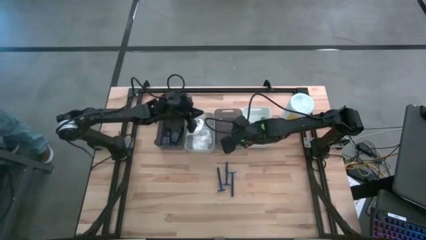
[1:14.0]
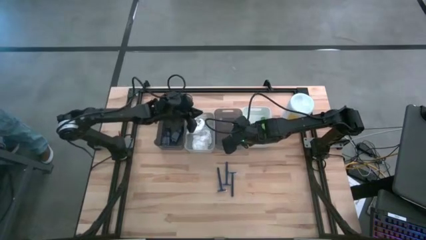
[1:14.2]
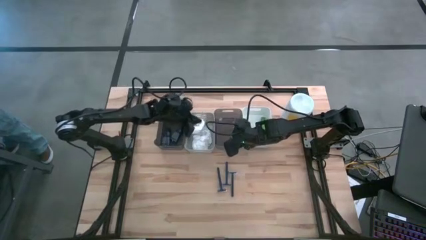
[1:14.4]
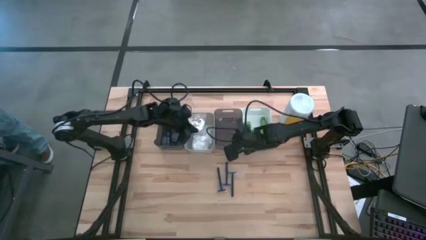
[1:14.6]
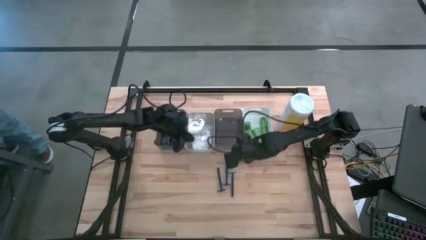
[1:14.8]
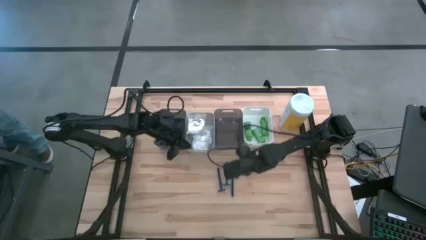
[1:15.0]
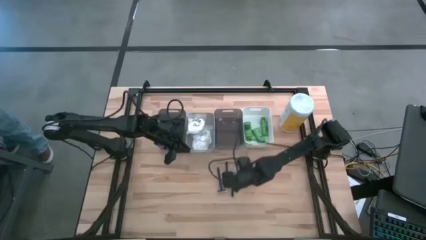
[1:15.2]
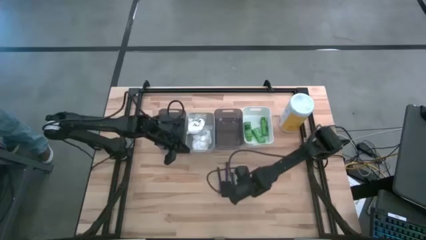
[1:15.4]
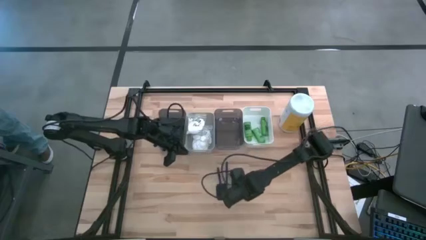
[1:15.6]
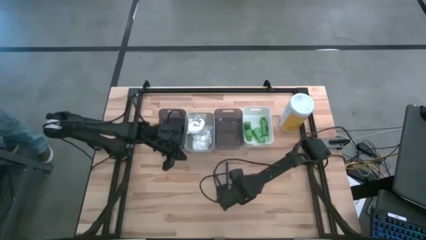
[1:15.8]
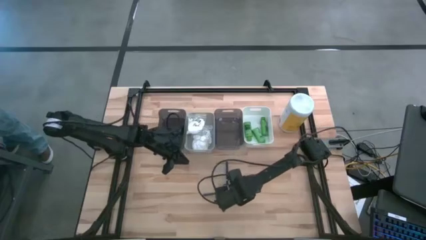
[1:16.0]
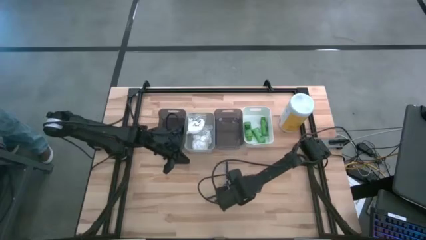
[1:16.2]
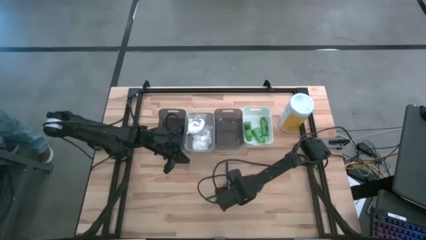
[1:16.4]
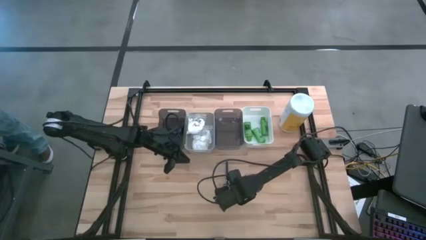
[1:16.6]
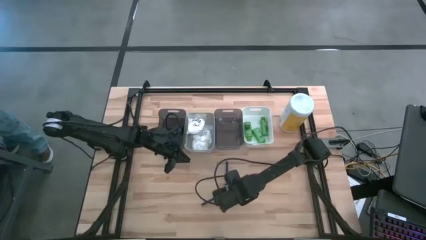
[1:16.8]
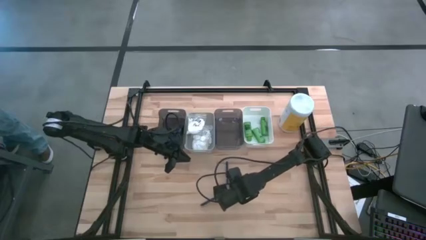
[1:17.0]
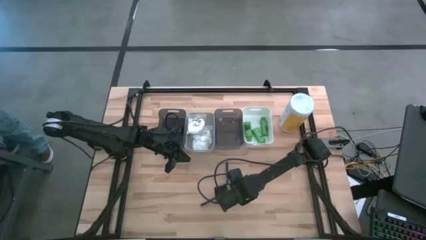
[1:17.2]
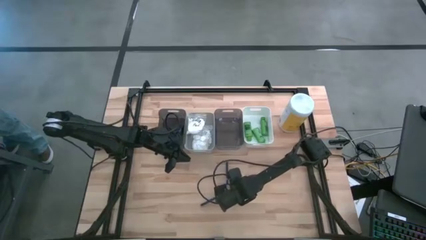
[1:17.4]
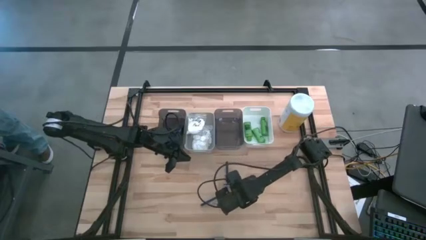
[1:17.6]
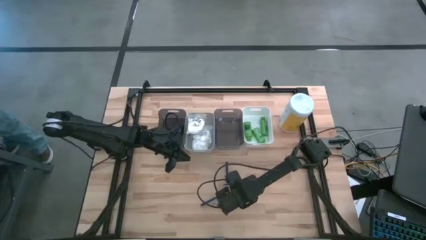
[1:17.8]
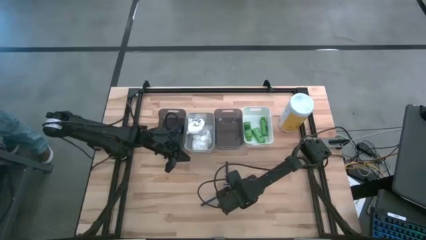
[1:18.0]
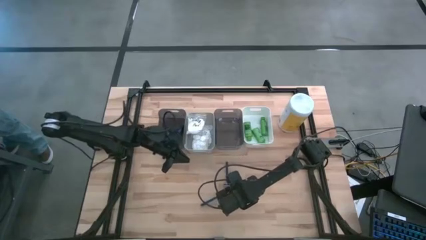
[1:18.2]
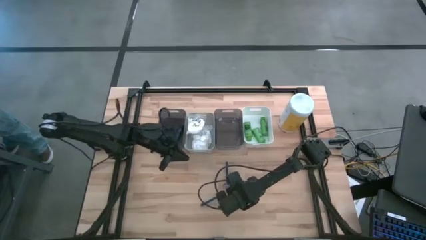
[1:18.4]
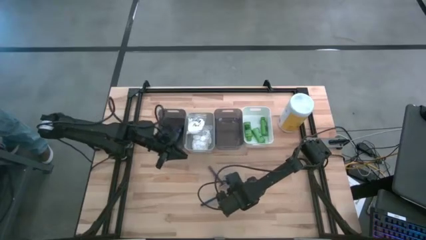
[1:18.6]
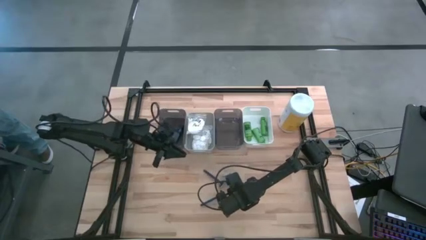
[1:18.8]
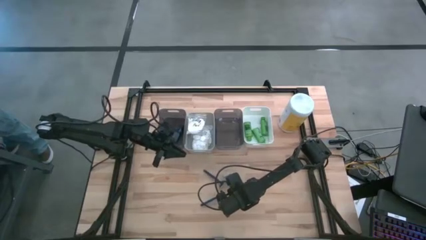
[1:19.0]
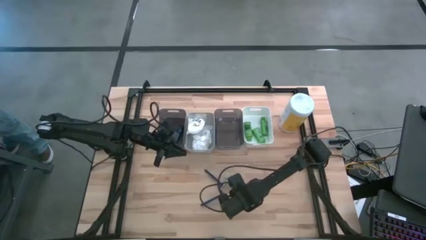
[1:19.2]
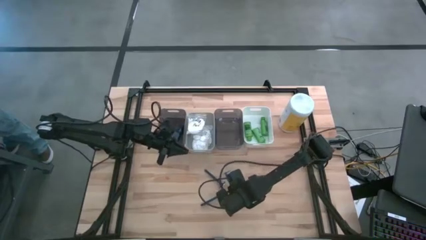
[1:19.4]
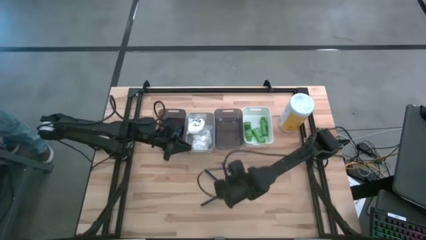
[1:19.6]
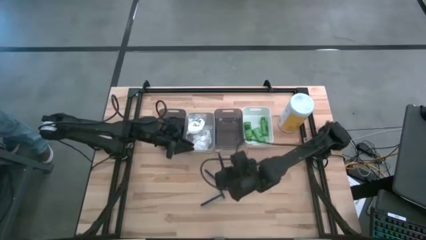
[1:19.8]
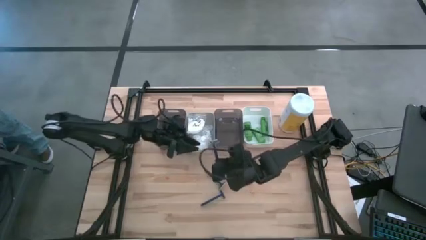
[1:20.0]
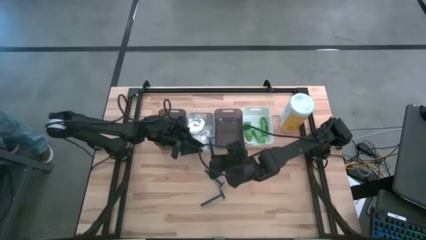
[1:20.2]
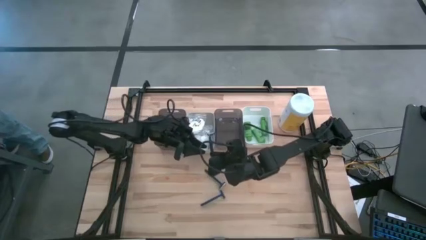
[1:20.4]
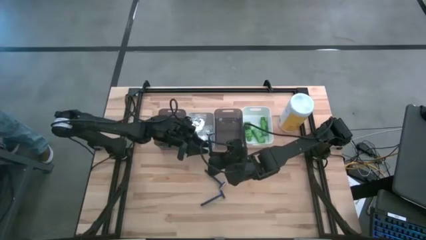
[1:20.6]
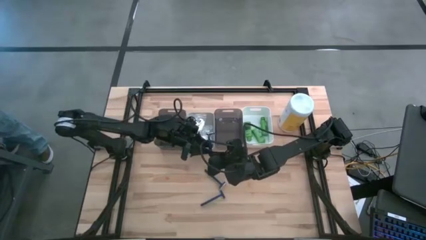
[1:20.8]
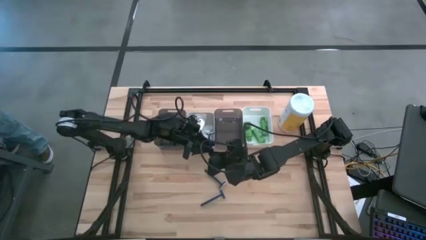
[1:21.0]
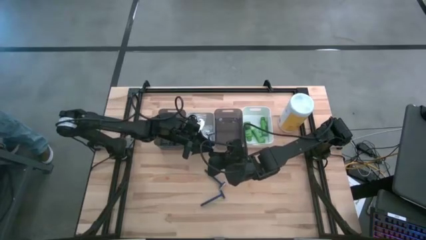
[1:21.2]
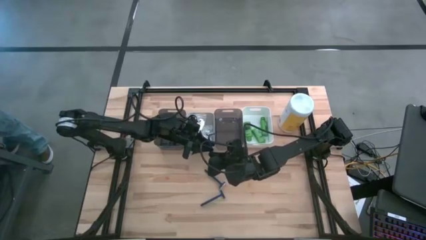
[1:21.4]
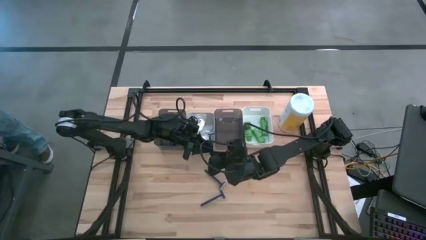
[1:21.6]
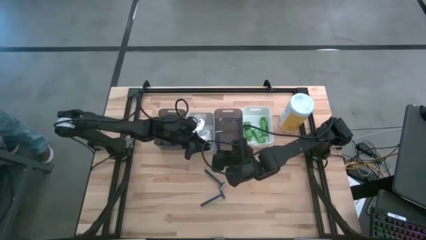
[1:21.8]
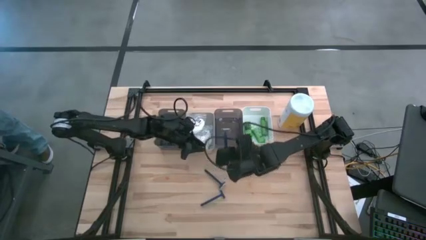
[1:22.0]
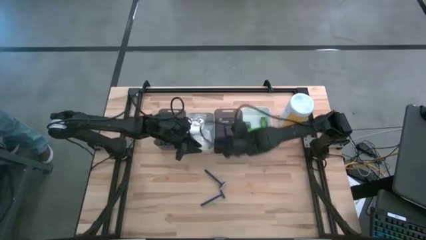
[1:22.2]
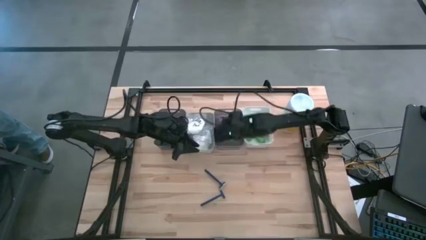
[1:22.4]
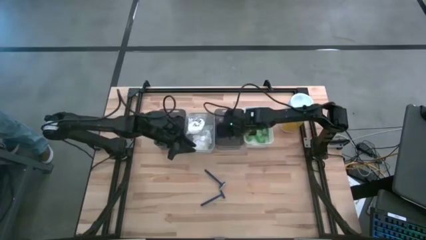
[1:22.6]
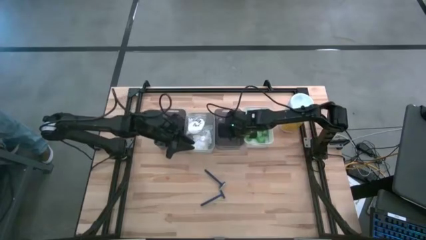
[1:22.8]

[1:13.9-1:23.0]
Task: Pick & Place Travel size toiletries
Put the blue razor into the right black bin

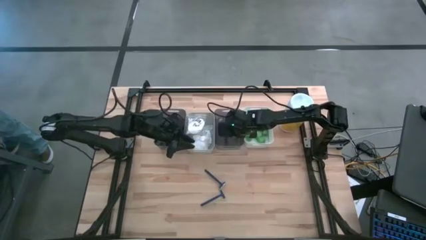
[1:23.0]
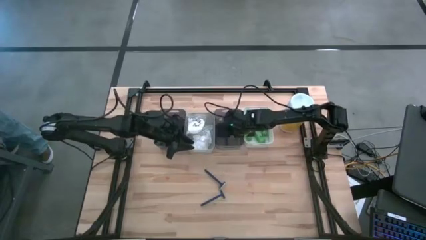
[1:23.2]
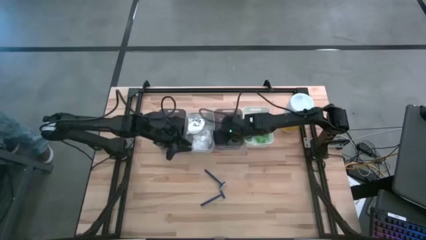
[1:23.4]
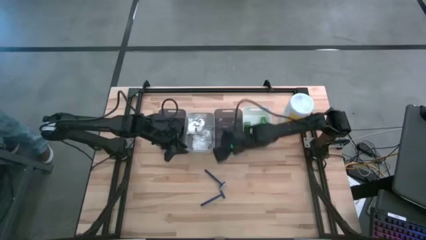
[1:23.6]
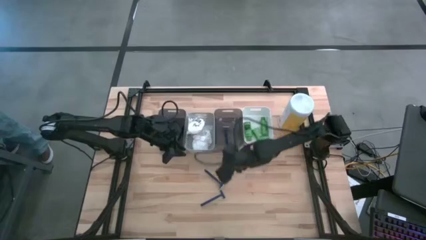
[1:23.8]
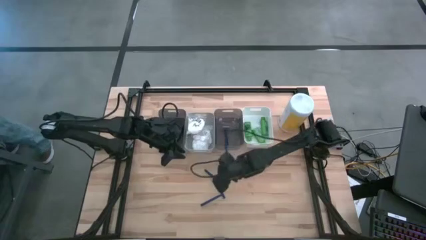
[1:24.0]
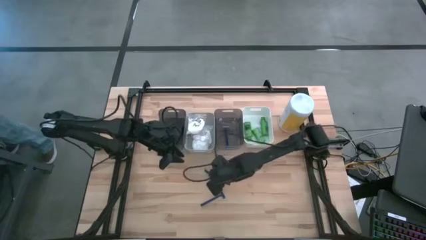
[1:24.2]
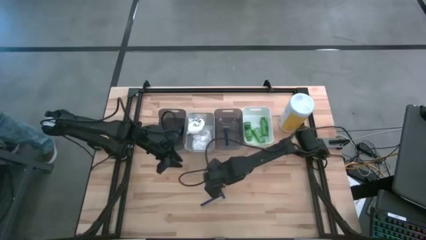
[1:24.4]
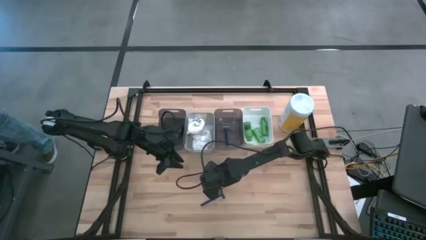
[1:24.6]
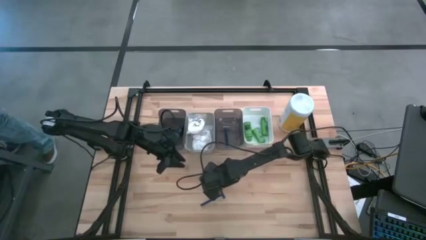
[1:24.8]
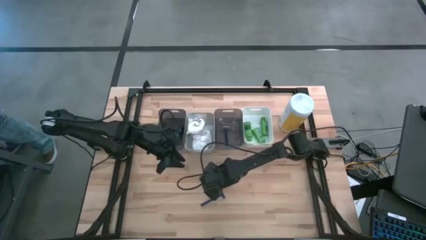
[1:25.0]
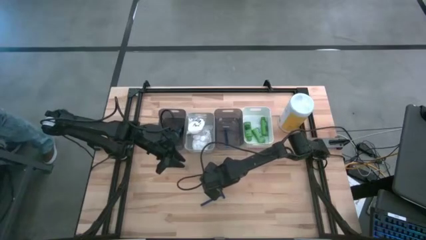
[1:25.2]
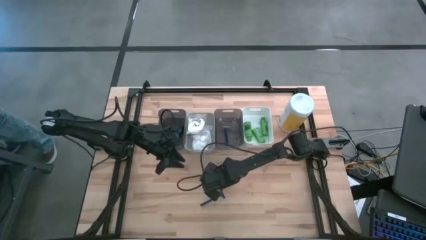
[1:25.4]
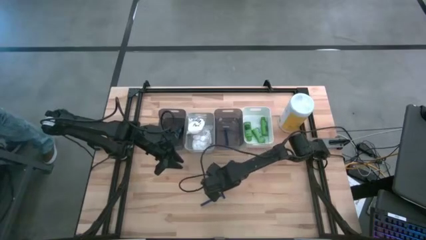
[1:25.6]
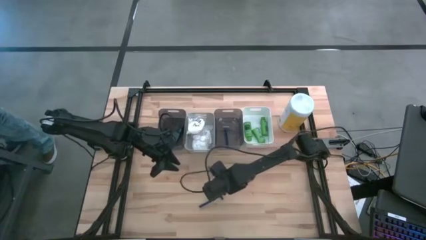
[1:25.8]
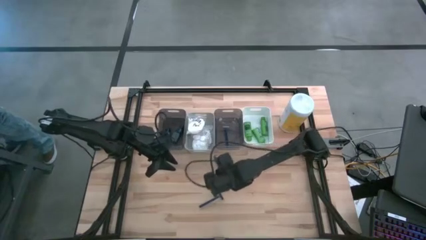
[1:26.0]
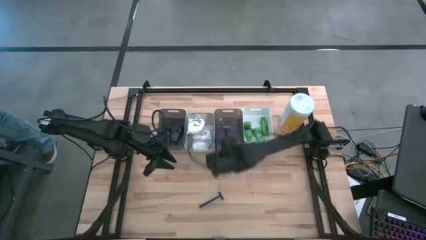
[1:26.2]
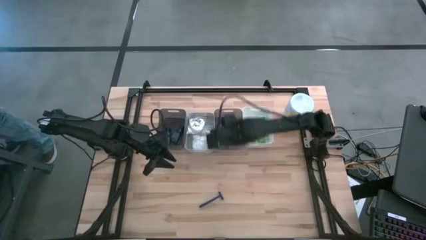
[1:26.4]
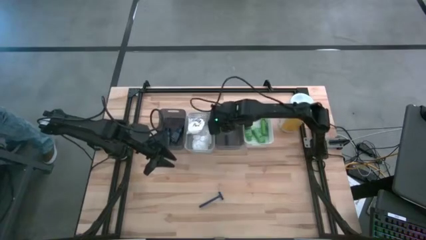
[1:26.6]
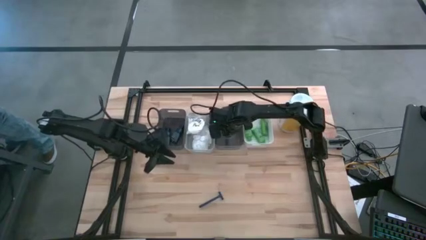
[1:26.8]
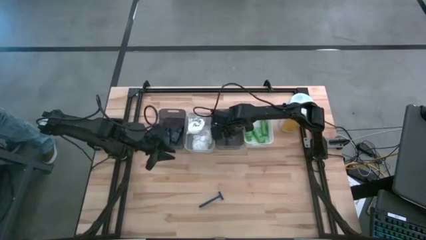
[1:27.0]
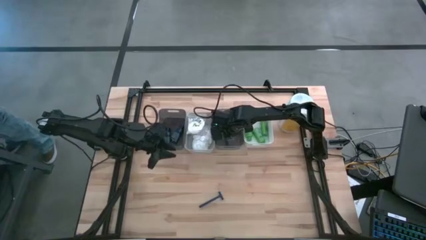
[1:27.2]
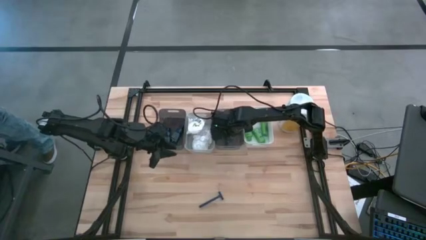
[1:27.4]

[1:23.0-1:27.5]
Put the blue razor into the right black bin

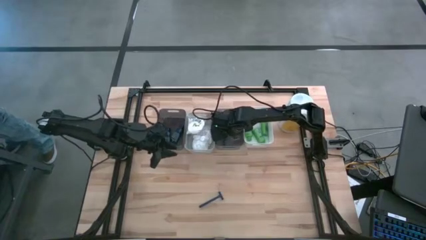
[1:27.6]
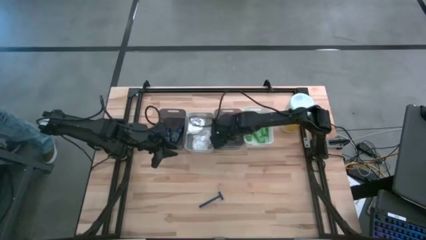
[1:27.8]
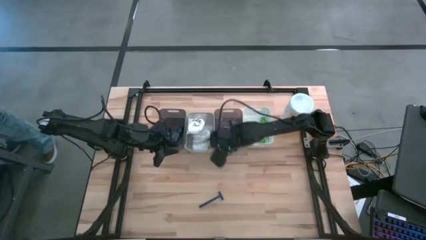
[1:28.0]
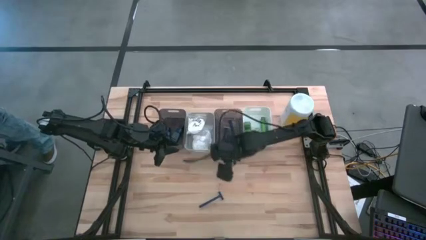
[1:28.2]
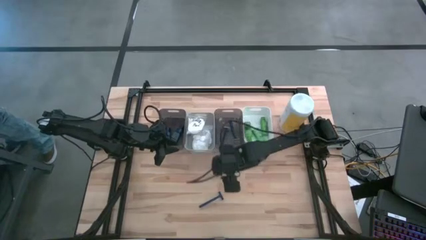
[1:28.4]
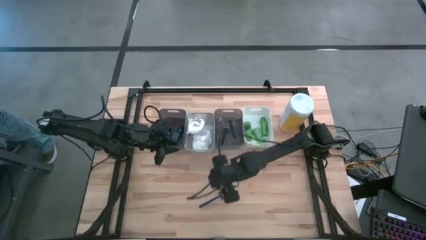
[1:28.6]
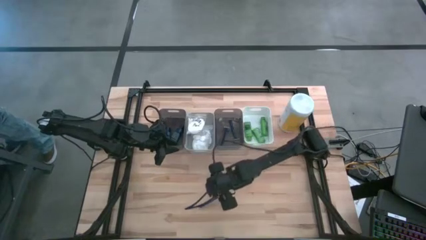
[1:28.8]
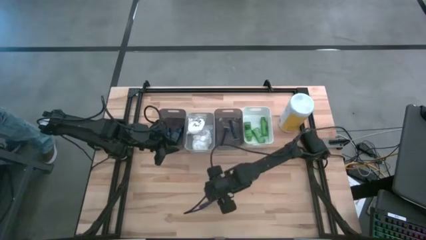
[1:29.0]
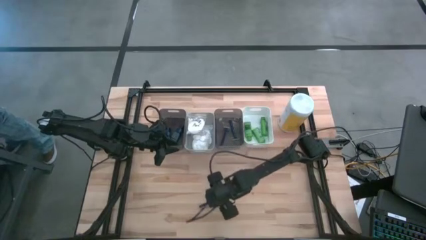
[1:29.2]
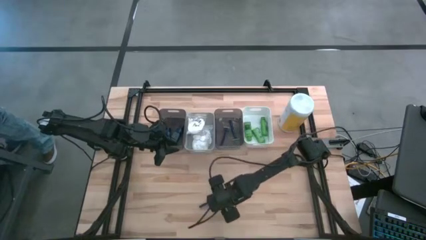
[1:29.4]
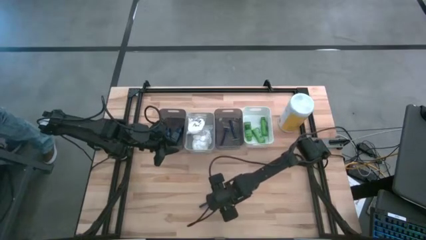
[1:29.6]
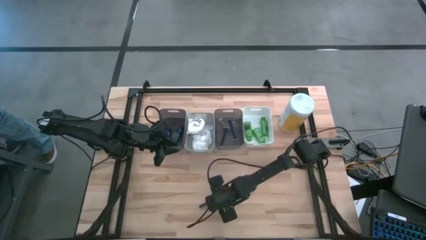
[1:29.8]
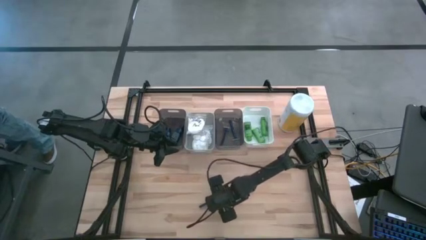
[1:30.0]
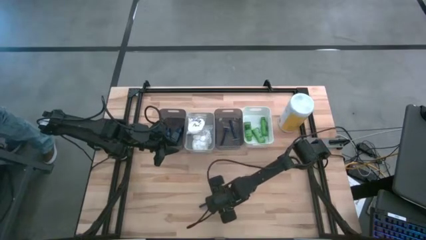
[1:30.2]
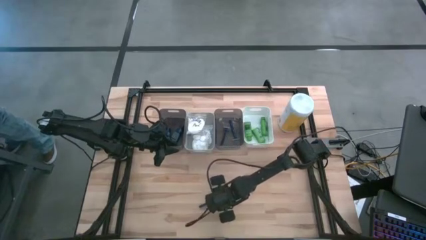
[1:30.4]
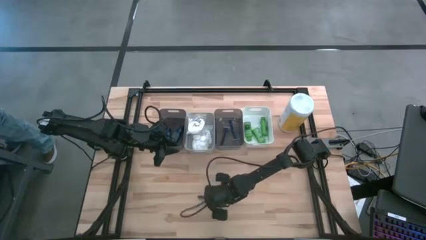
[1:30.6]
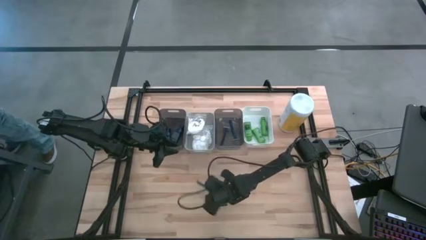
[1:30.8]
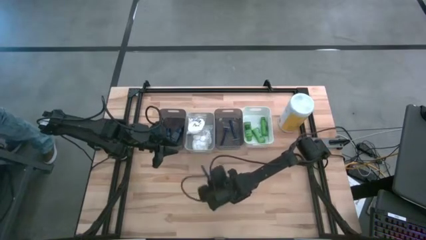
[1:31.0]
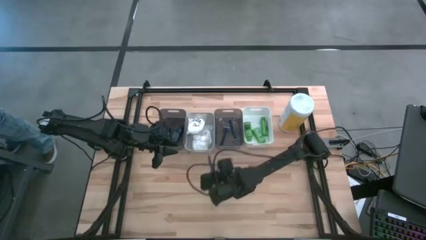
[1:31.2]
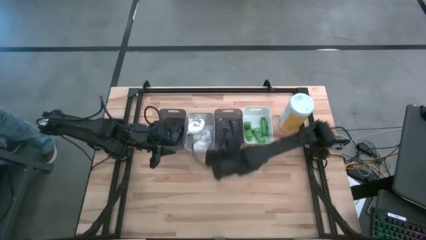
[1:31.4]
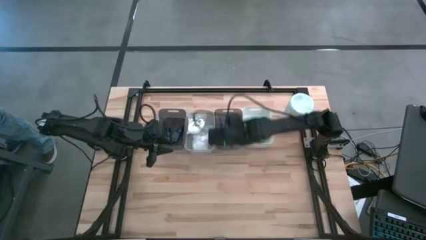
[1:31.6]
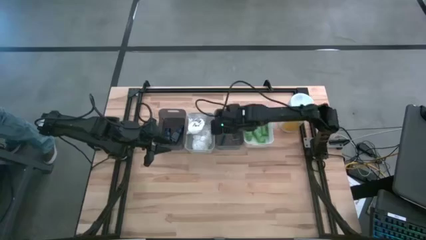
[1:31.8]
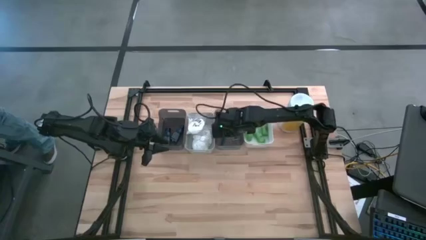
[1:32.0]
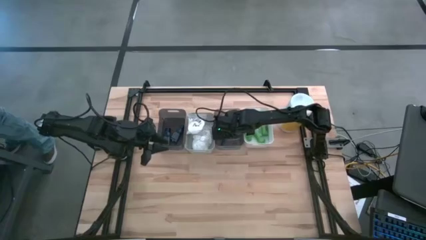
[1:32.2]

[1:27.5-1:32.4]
Put the blue razor into the right black bin
